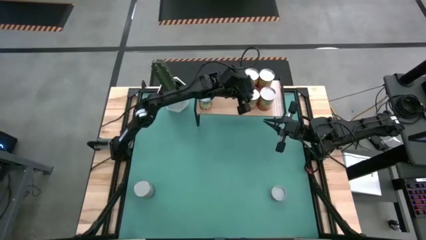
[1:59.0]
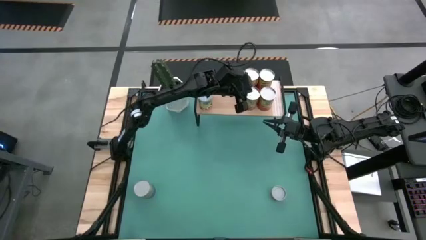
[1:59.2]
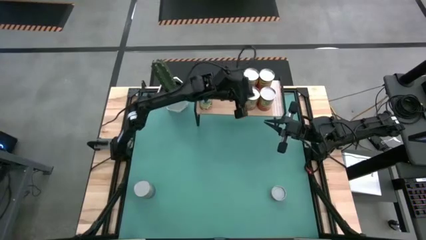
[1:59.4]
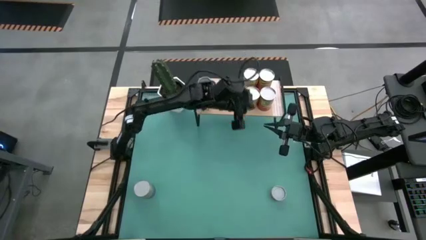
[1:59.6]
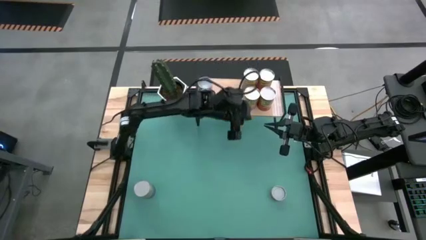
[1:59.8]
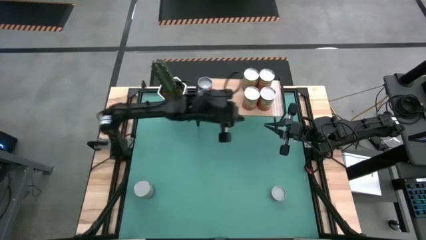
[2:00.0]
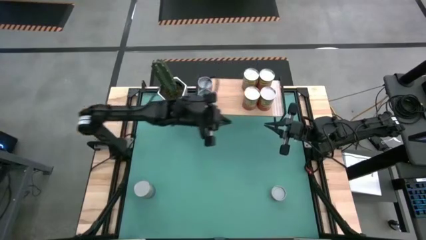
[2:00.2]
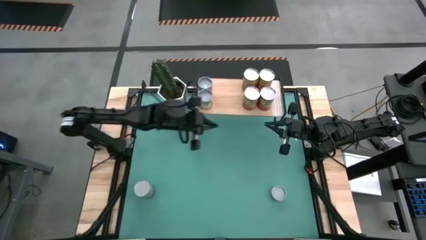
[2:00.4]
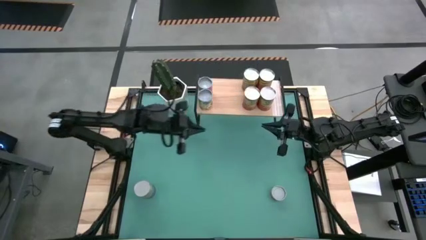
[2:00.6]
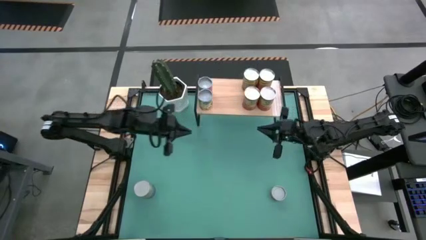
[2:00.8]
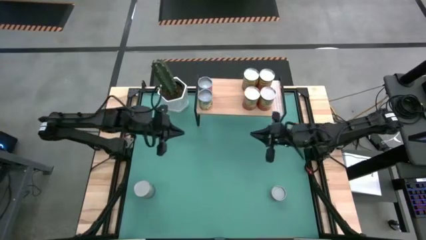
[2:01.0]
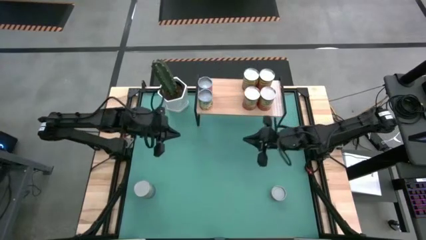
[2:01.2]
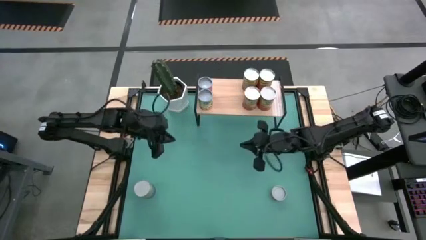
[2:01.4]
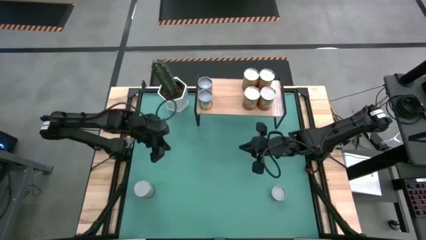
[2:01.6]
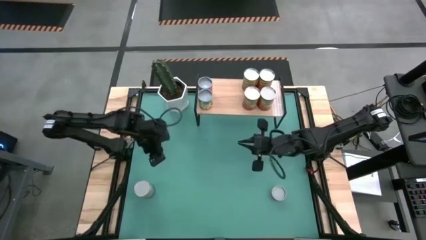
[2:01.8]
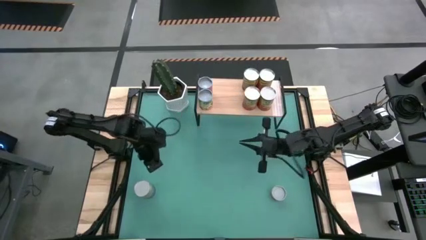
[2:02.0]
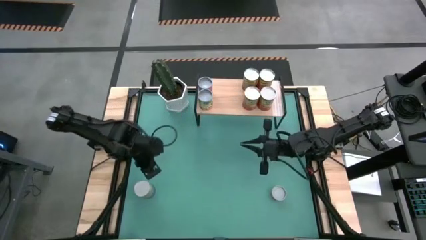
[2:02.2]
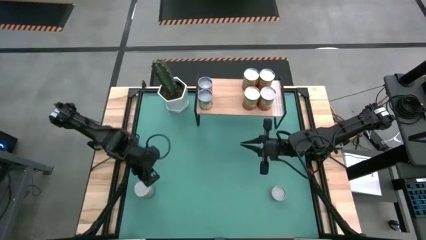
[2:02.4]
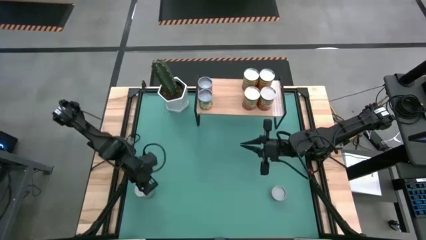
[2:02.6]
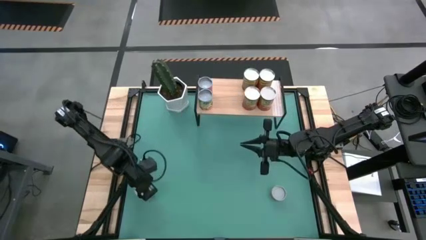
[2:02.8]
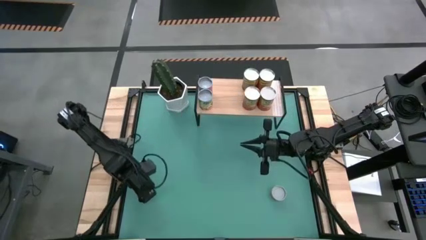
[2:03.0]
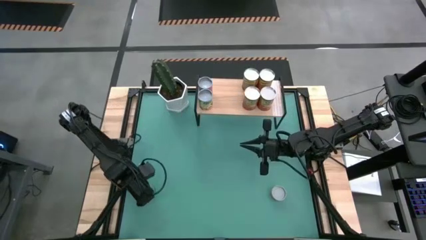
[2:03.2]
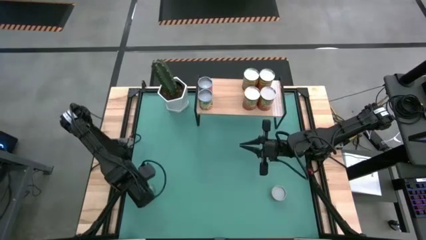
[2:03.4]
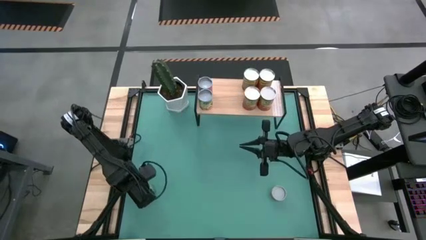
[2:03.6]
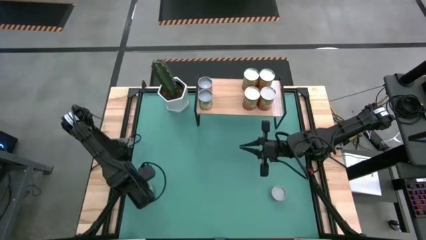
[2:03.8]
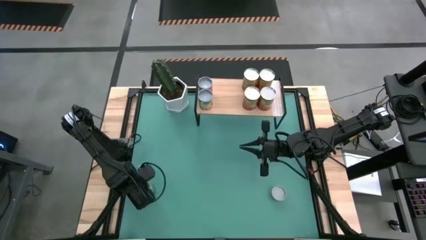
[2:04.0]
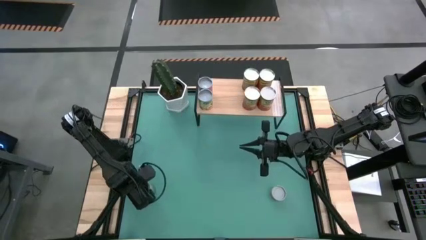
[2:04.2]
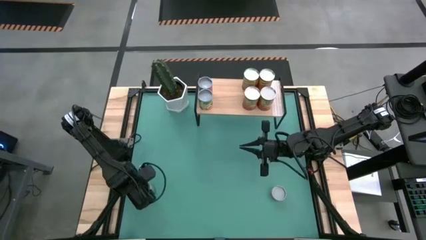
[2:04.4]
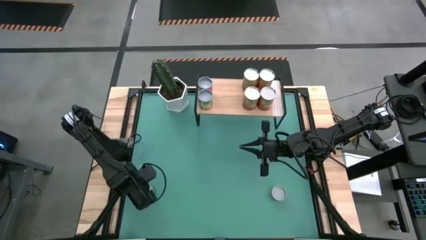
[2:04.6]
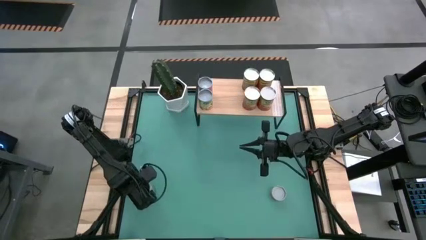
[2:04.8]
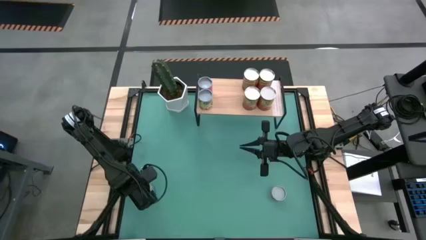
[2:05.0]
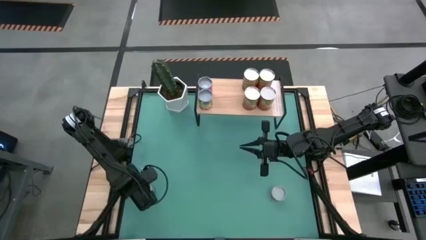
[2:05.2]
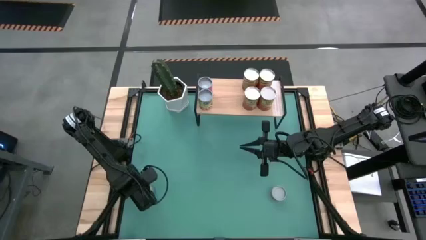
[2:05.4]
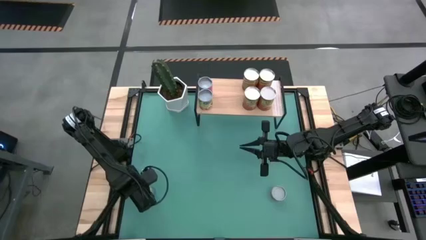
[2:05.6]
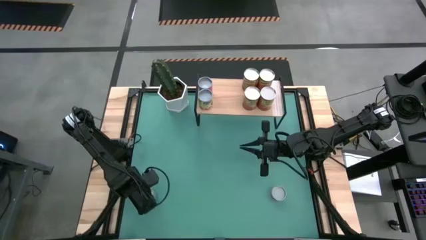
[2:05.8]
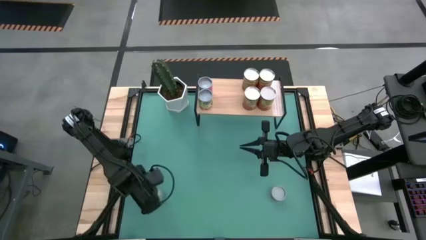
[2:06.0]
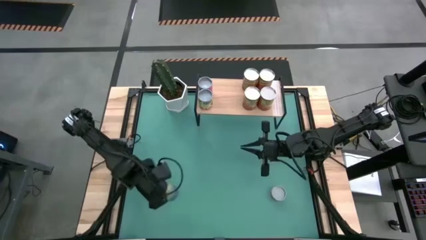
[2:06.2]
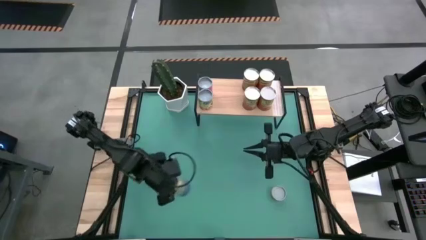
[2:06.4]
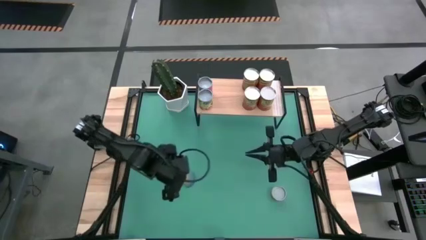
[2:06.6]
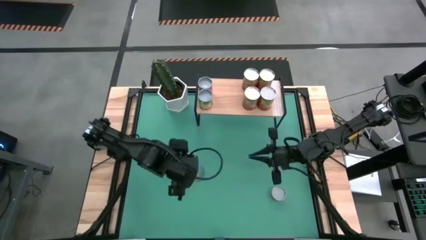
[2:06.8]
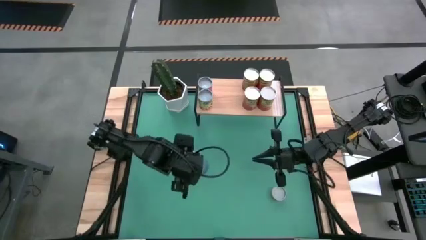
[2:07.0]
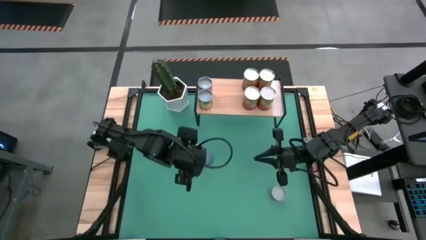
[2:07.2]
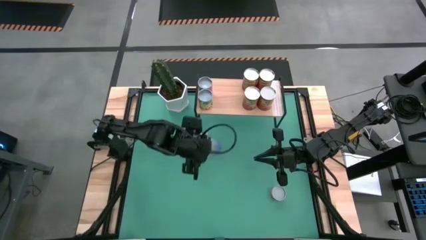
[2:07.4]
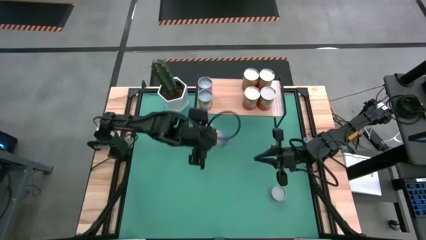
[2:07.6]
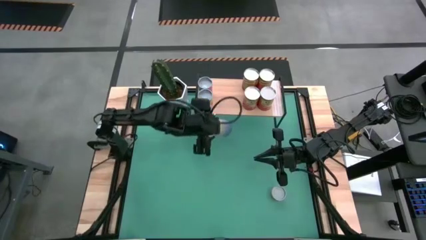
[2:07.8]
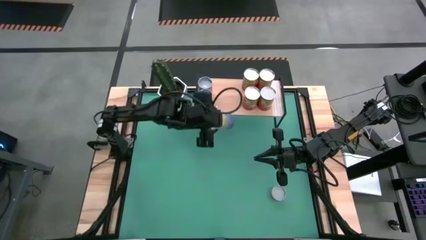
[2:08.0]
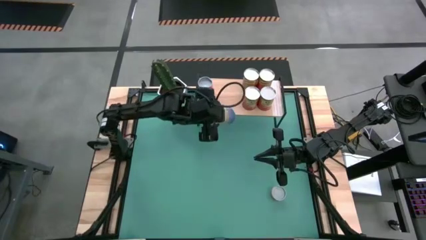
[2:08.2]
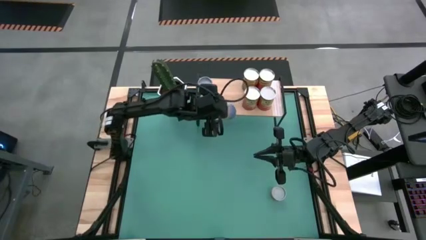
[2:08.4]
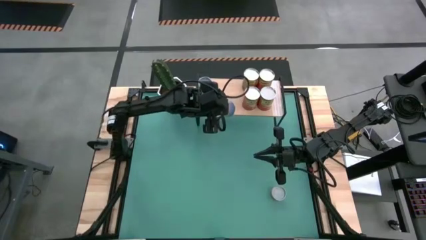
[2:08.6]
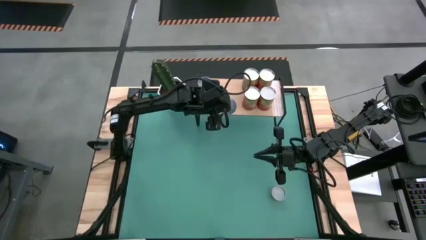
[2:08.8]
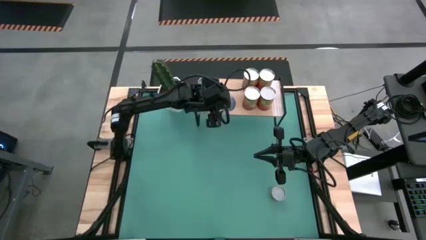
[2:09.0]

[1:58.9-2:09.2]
Task: Pick and place cans onto a shelf
Put the canned peas on the shelf

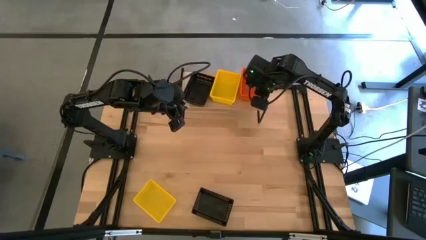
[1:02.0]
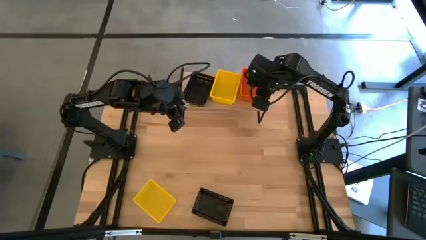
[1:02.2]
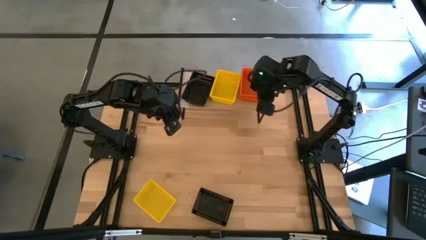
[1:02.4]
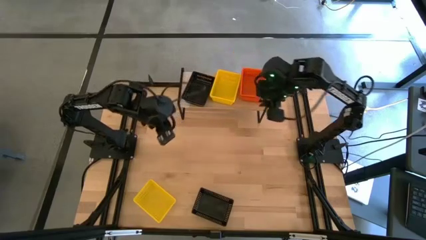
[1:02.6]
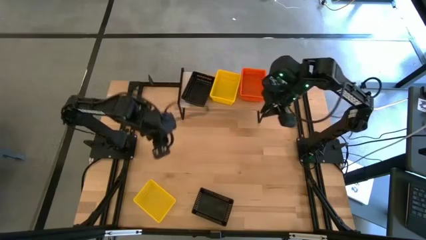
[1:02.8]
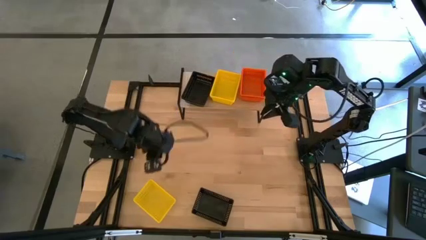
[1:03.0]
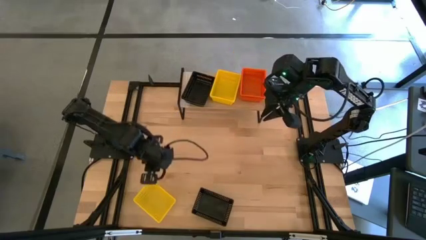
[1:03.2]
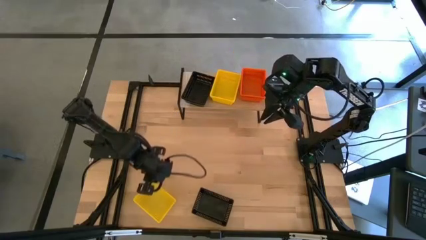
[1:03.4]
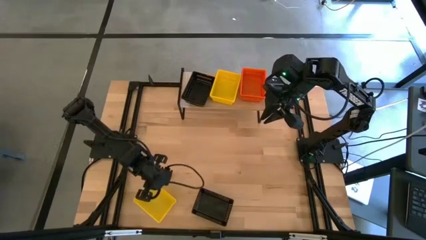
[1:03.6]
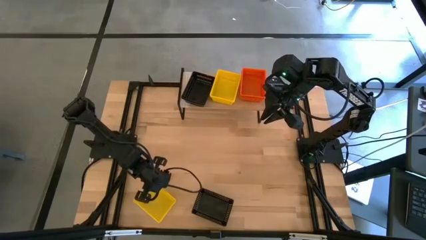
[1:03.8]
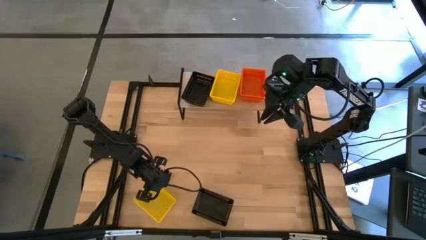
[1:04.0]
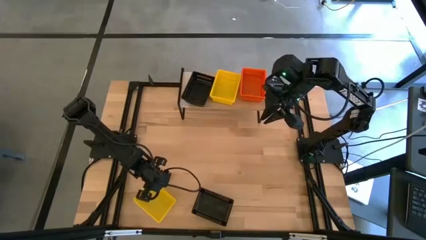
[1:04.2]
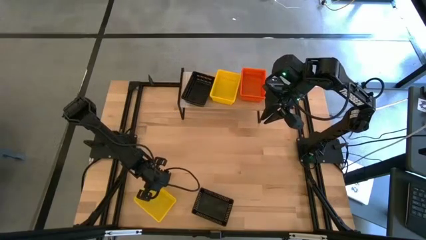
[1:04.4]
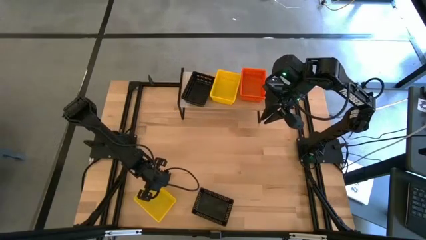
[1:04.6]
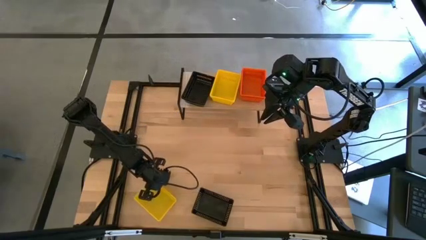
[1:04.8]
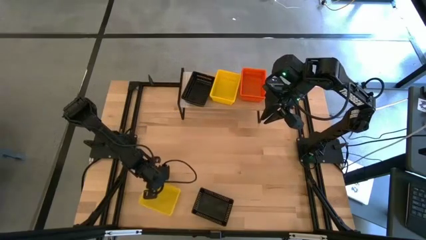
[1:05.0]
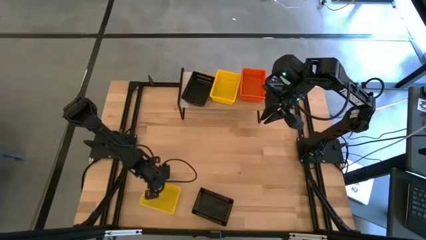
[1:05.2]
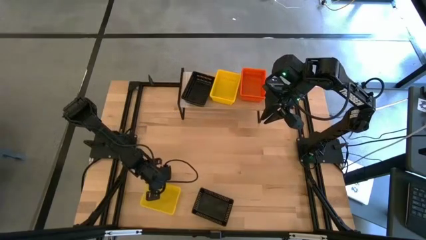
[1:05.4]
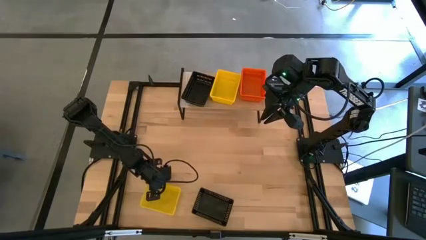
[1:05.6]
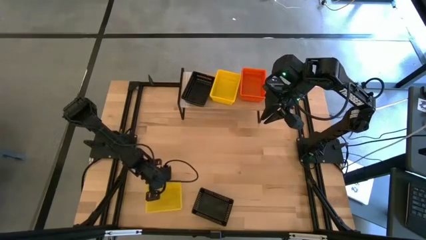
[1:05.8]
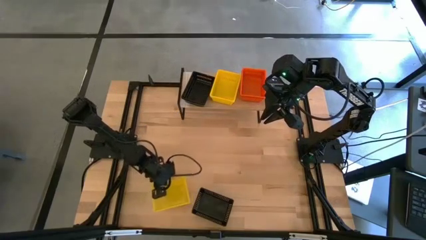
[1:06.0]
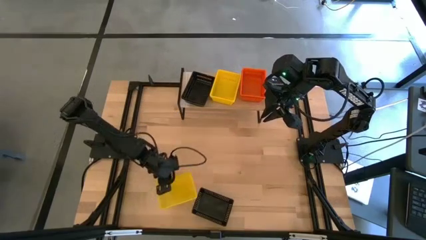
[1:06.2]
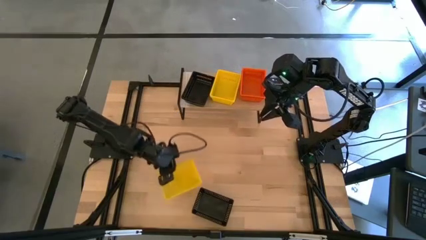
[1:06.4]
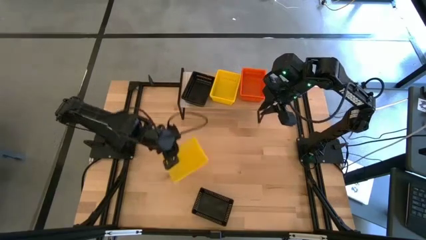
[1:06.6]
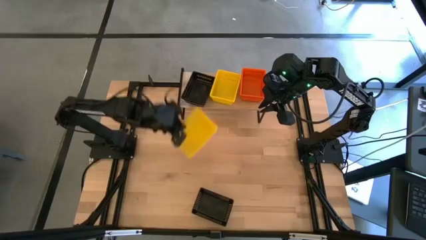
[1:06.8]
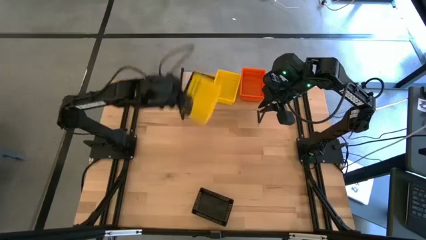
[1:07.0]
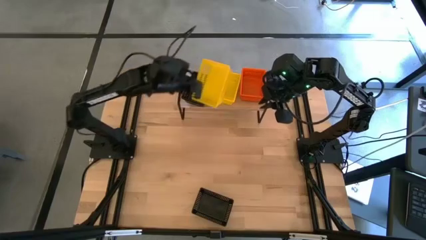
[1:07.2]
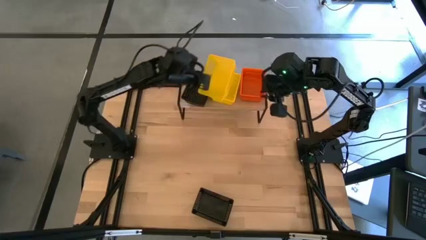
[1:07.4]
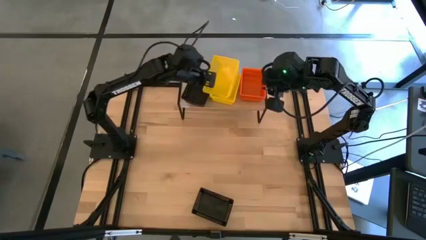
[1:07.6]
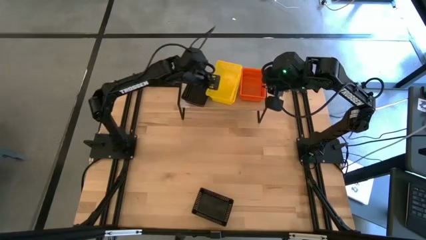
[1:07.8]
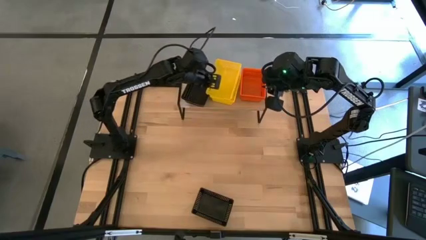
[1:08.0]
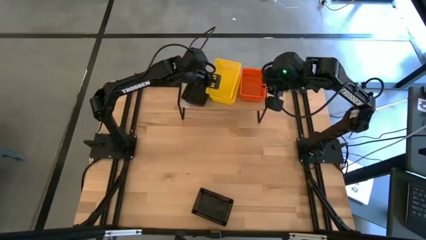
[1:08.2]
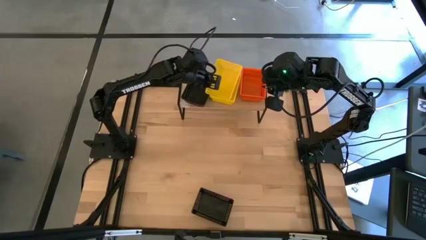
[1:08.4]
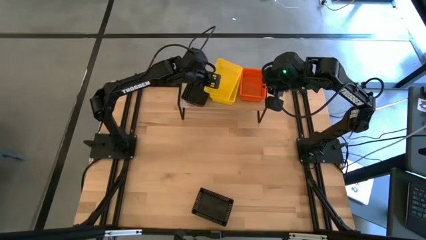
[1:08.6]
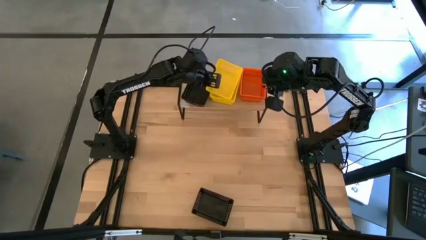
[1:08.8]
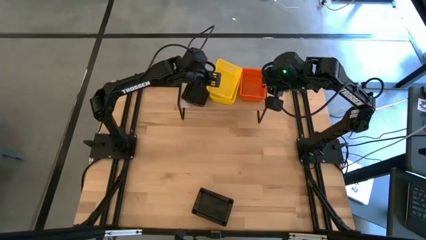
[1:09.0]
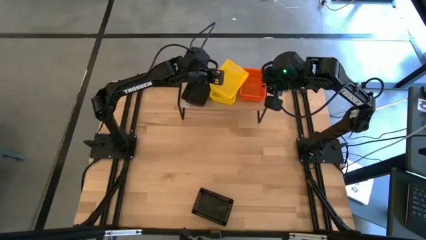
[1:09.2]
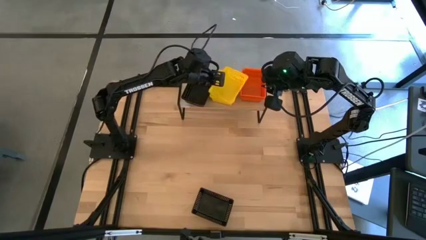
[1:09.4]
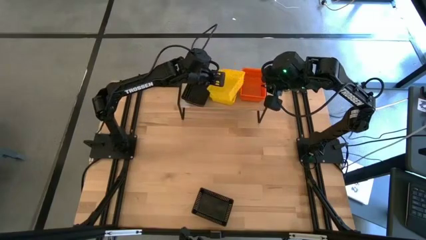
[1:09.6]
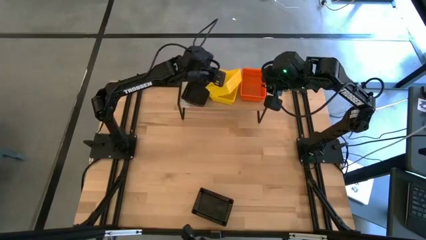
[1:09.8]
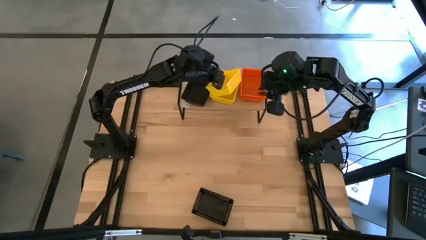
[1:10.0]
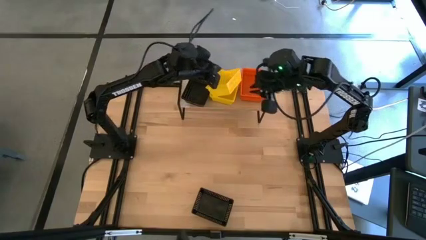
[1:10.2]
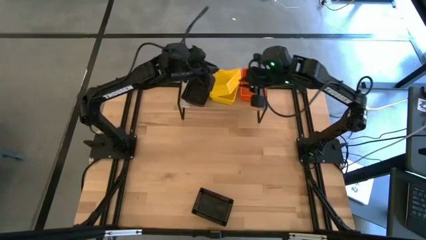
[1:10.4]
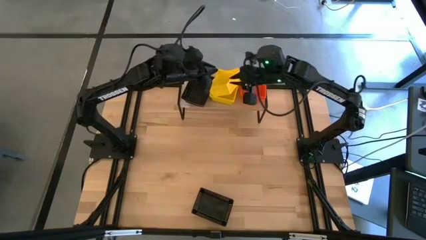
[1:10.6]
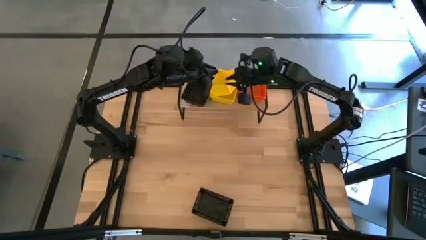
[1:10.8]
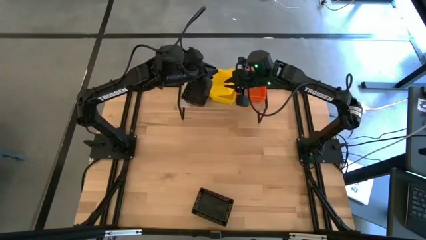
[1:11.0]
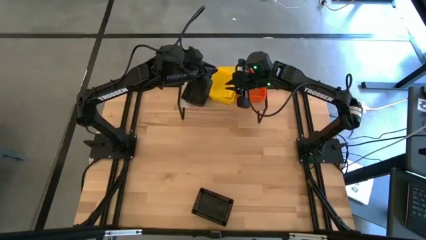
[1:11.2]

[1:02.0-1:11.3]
Task: Stack baskets on shelf by color
Stack the yellow basket on the yellow baskets on the shelf
